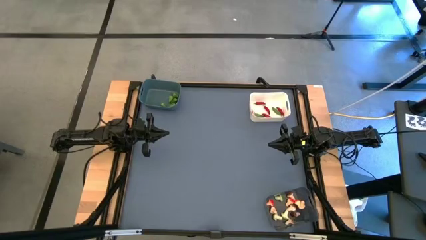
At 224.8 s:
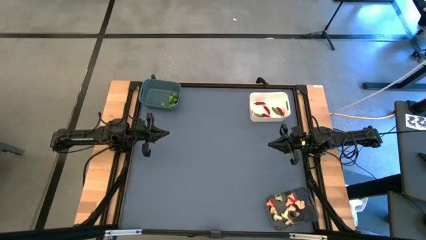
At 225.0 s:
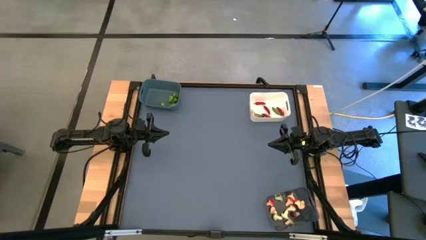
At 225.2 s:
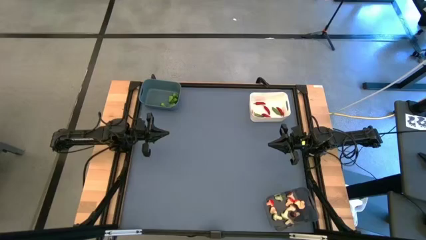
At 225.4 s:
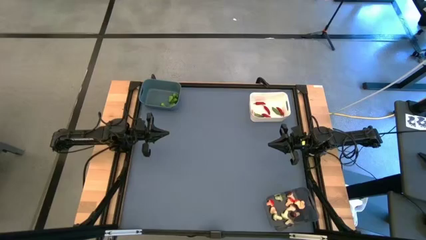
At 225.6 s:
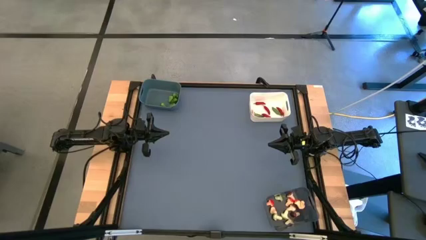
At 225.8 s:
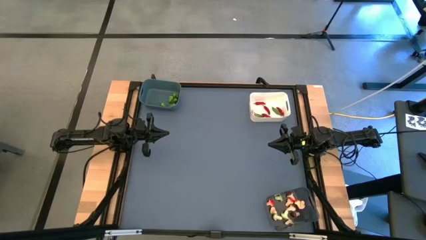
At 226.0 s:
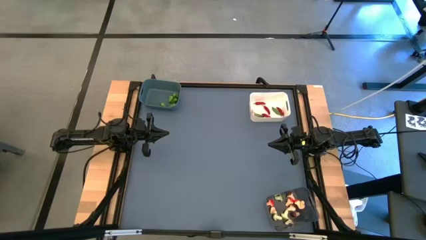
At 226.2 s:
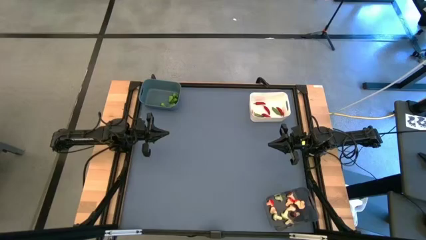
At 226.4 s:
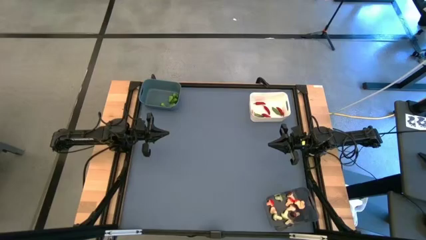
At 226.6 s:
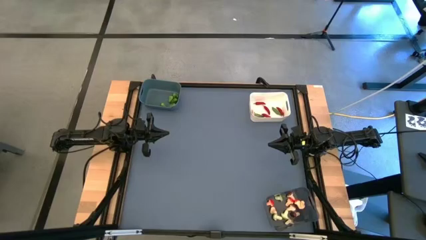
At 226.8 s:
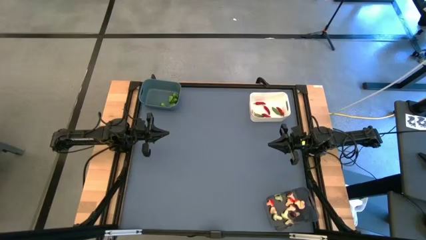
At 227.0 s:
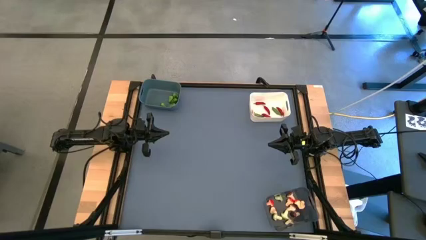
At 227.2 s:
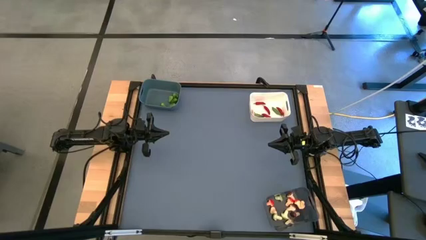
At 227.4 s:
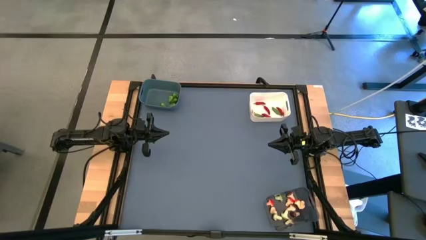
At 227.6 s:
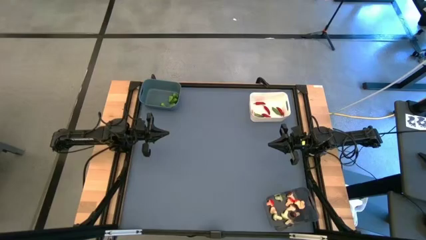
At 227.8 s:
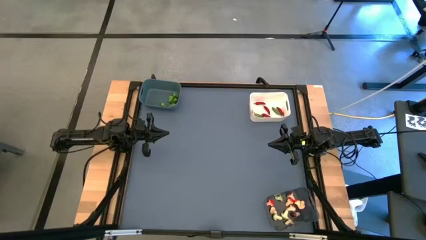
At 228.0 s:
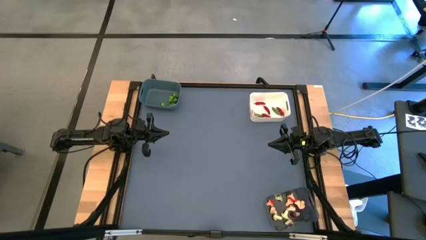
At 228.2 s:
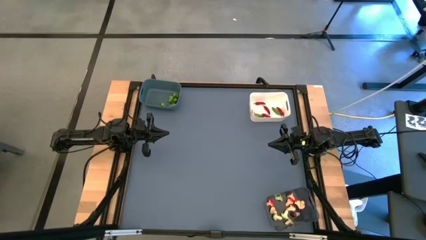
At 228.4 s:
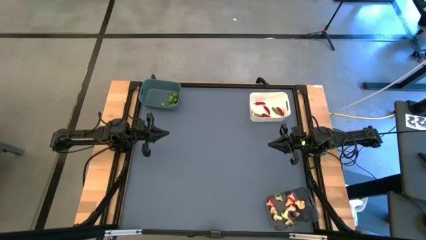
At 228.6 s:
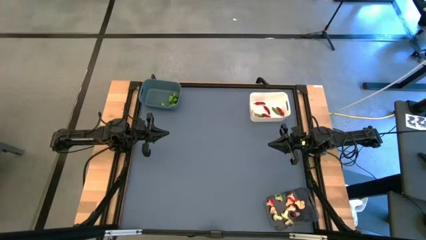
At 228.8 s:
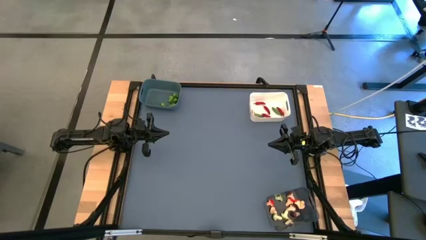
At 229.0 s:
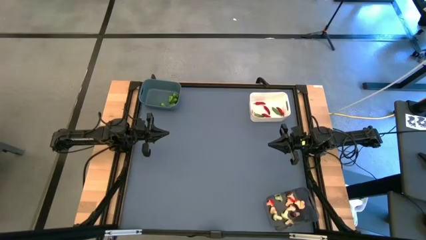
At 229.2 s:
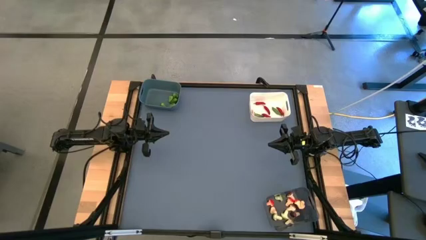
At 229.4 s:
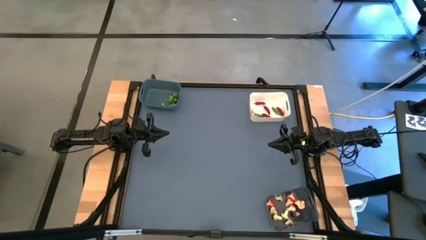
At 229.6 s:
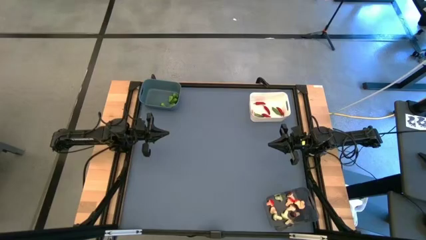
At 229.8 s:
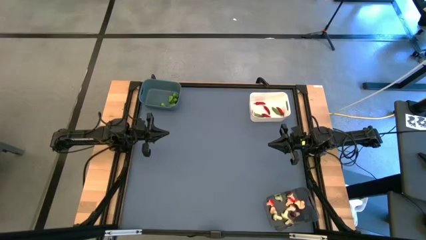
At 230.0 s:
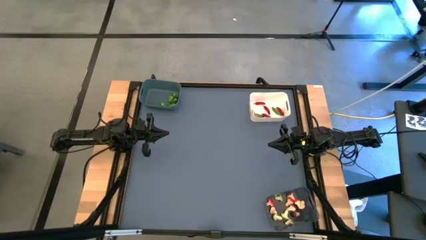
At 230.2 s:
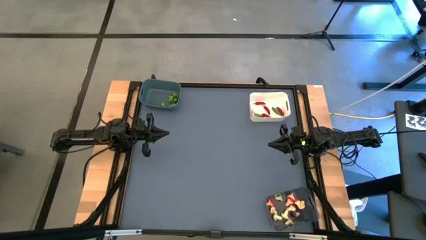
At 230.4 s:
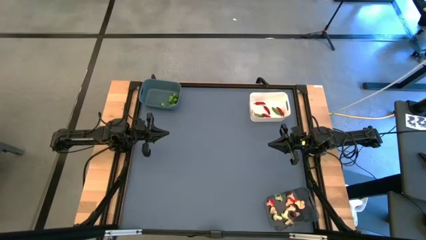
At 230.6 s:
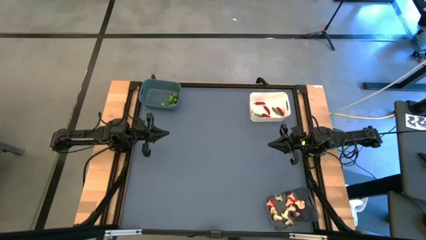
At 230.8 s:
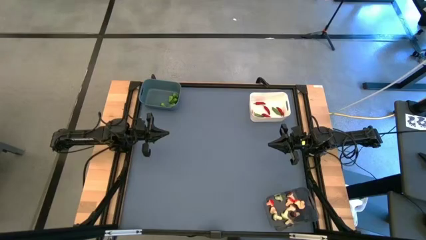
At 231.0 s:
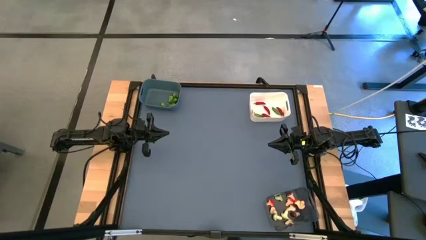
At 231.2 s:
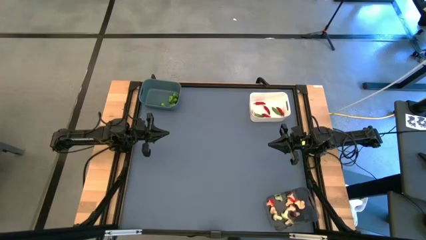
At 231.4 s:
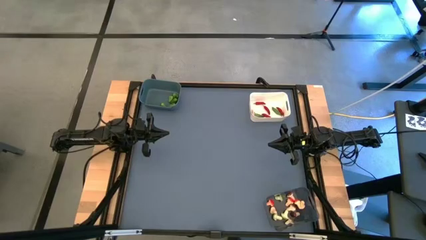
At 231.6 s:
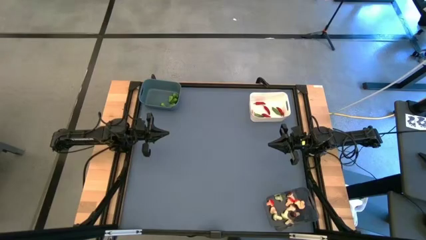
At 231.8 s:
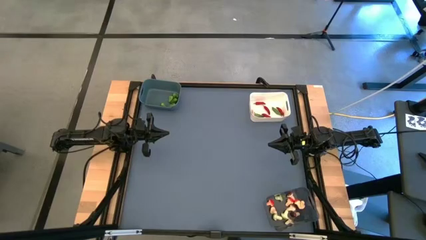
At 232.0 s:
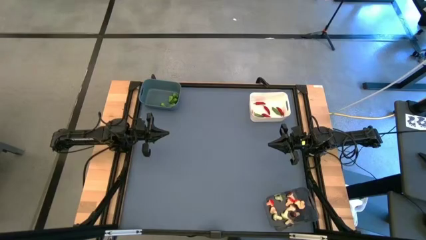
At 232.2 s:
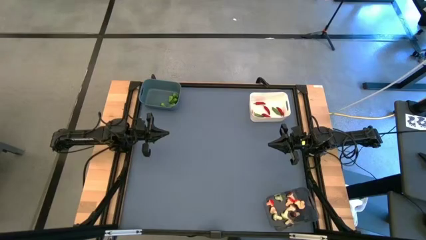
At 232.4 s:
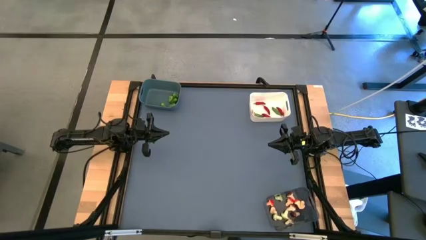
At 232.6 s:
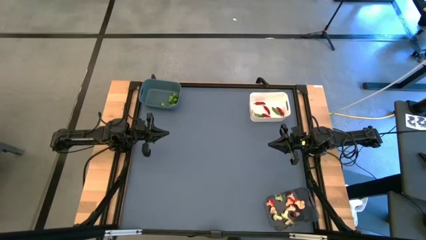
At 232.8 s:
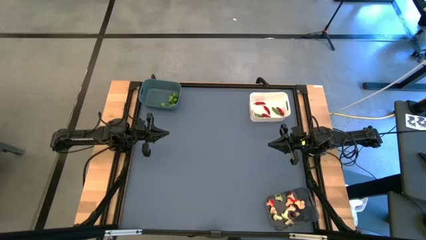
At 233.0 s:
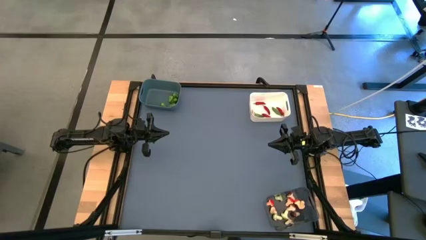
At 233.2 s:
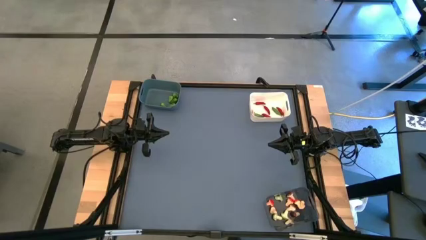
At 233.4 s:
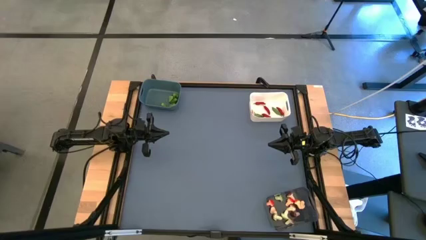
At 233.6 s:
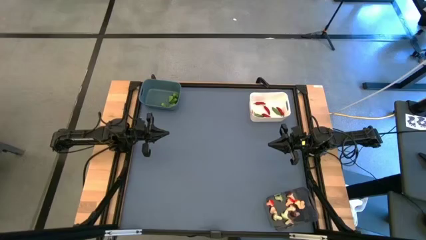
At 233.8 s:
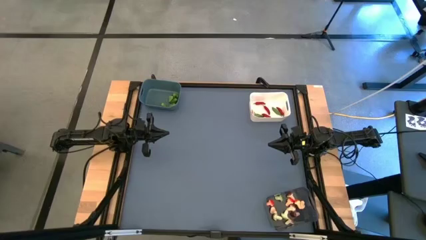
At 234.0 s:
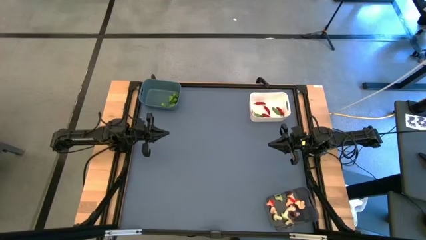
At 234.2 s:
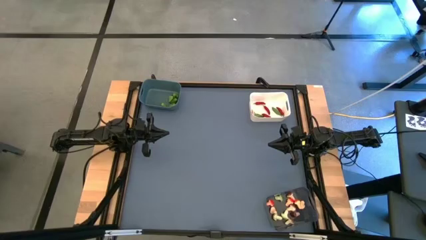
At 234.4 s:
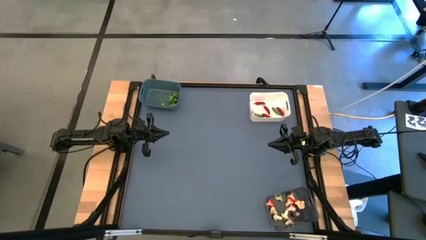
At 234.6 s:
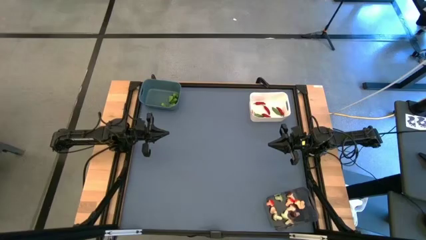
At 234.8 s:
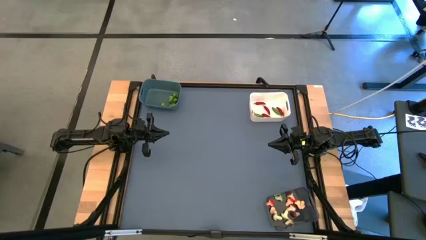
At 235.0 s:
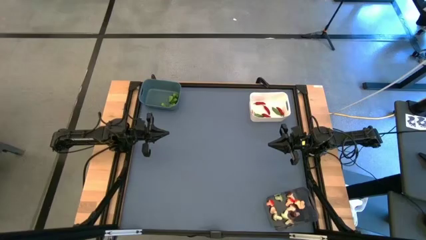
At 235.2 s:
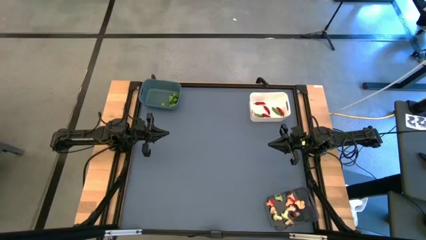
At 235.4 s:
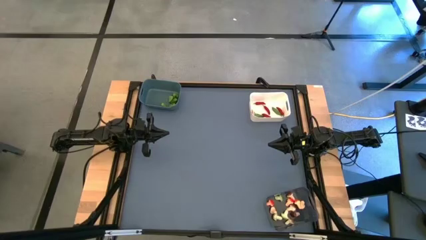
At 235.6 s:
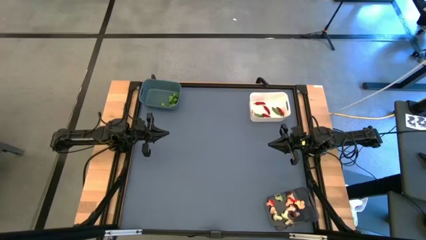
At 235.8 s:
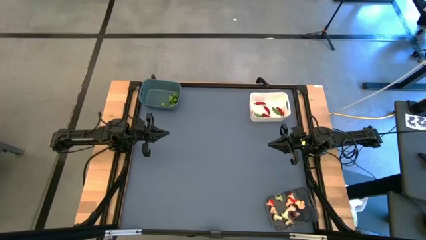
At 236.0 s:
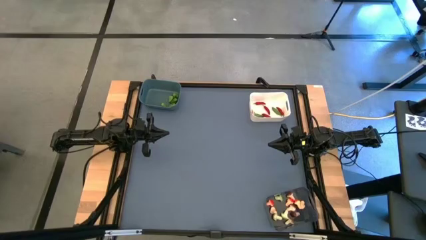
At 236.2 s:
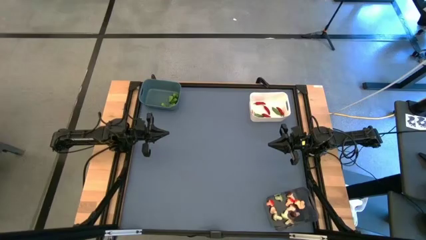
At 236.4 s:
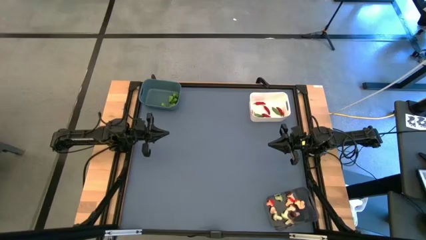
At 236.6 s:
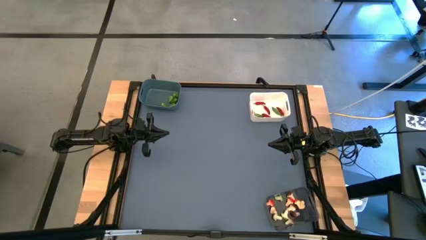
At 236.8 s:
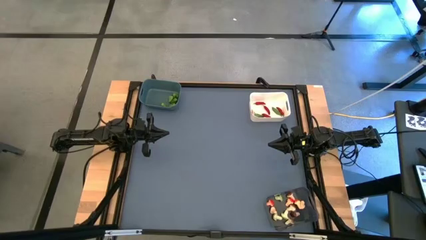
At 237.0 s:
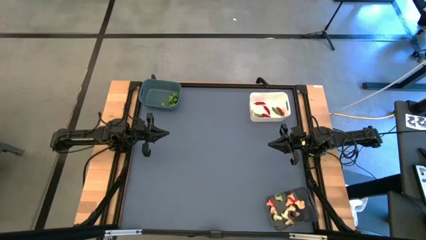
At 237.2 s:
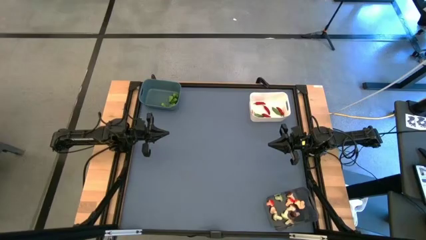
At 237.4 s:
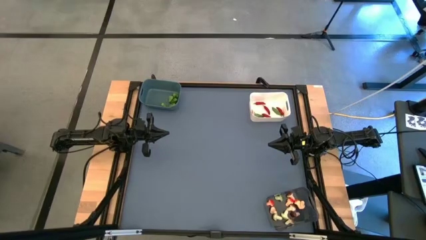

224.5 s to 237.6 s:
Task: Sort produce into baskets
Return to home position

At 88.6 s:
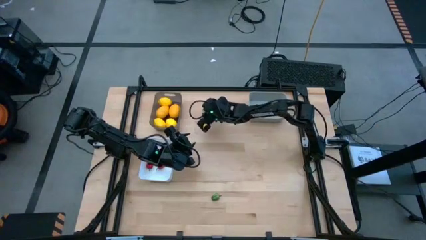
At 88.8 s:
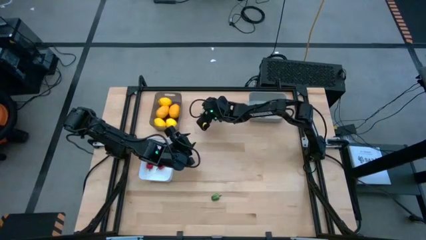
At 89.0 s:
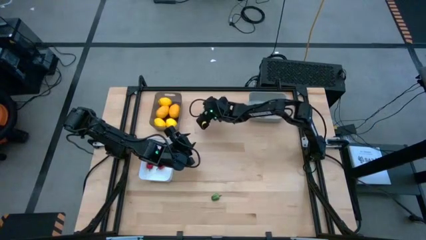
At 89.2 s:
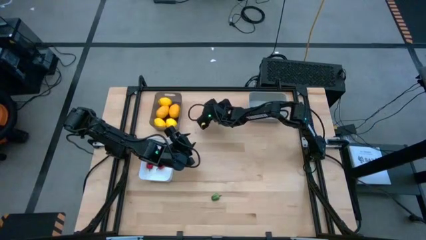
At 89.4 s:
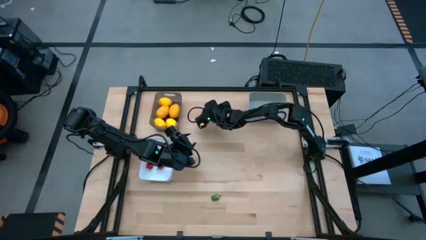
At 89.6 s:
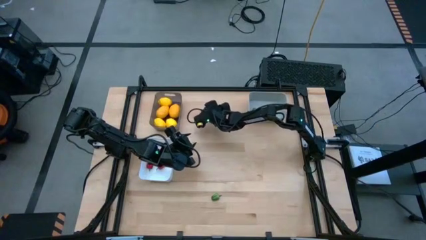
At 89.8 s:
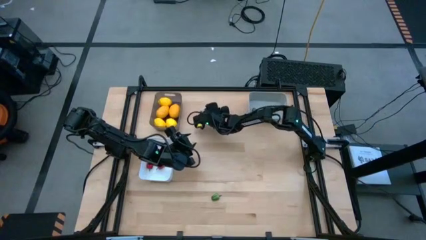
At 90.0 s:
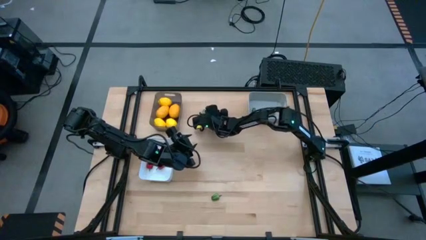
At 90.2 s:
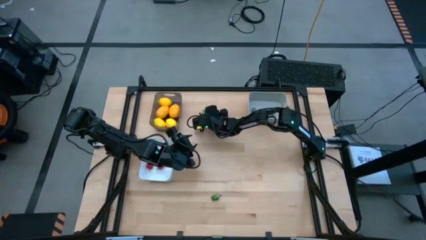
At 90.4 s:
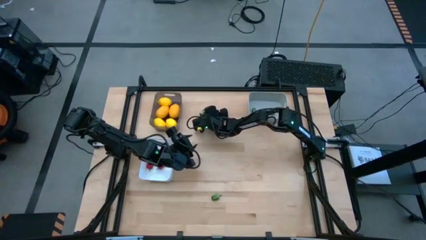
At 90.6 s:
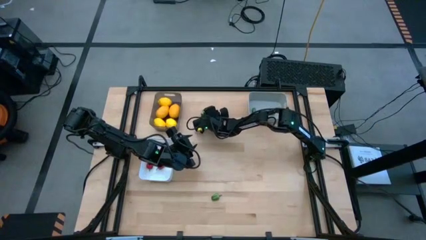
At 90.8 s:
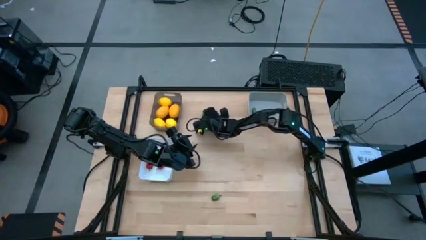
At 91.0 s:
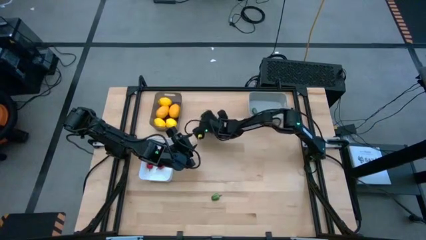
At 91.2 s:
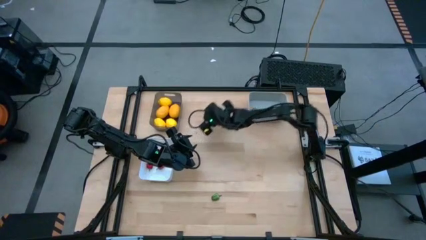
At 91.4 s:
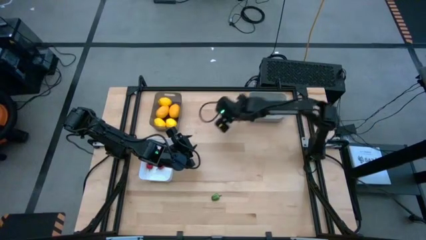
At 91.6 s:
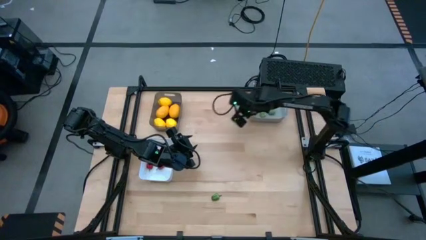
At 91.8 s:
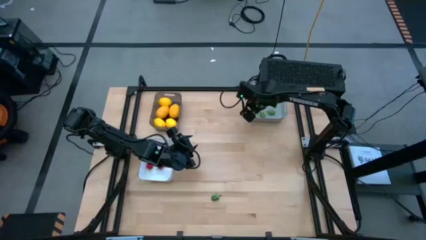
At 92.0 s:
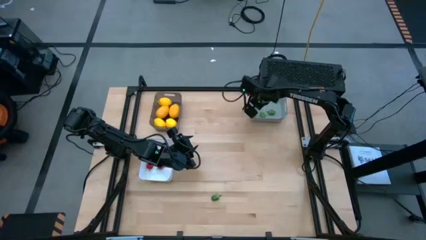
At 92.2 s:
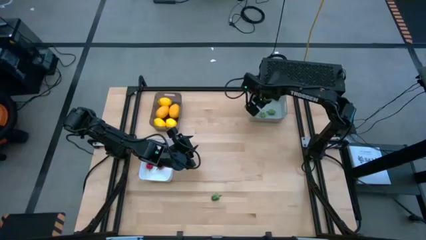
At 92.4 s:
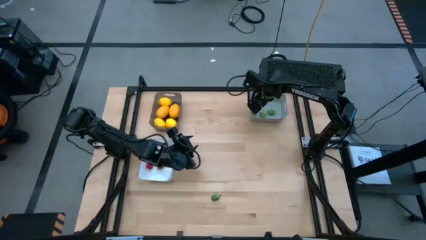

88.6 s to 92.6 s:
Task: Sort produce into baskets
Put the top green chili pepper into the gray bin
